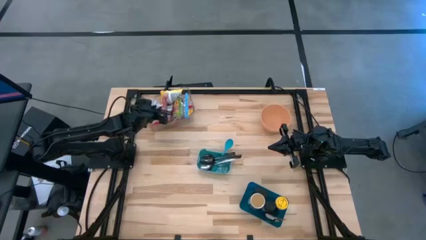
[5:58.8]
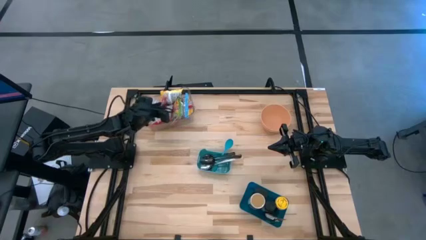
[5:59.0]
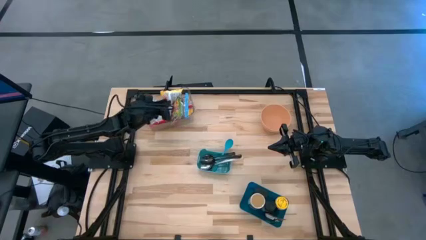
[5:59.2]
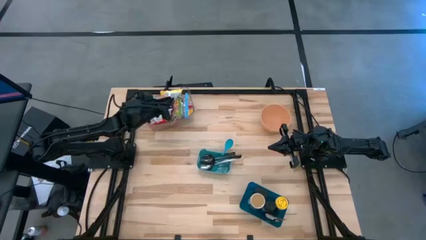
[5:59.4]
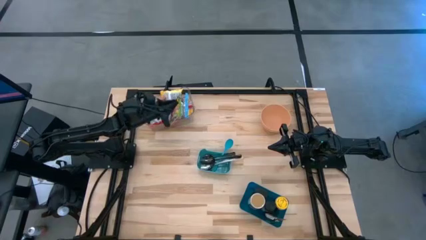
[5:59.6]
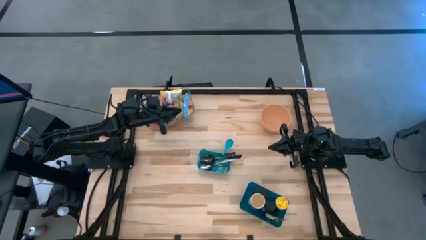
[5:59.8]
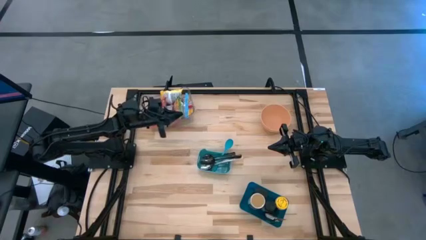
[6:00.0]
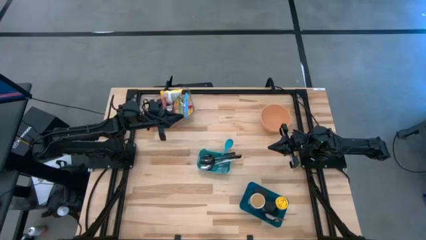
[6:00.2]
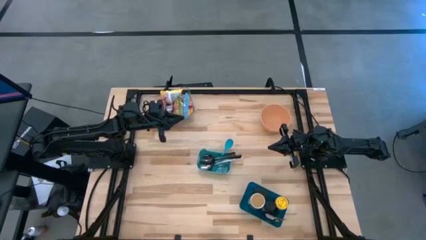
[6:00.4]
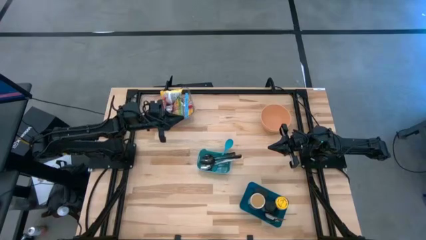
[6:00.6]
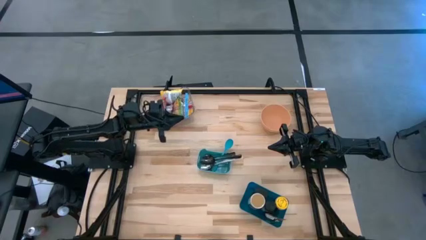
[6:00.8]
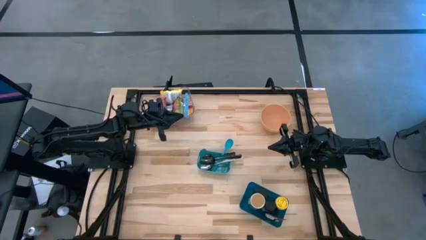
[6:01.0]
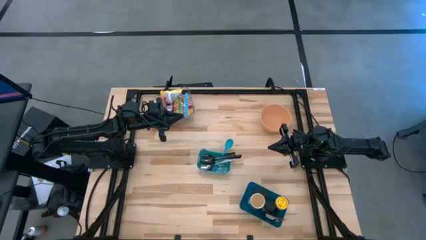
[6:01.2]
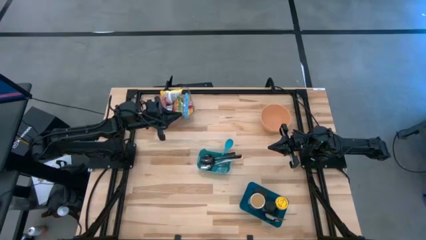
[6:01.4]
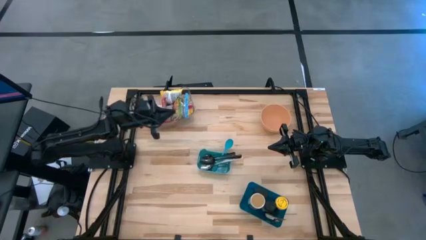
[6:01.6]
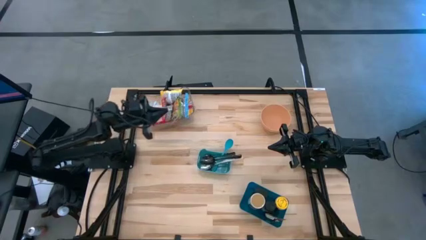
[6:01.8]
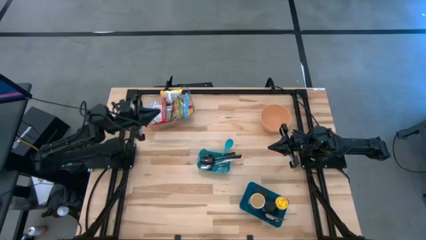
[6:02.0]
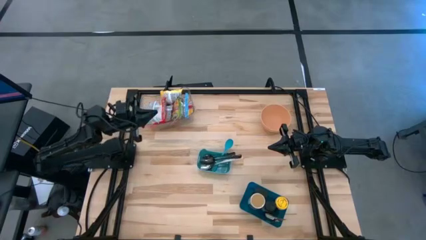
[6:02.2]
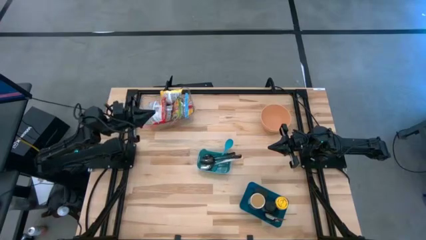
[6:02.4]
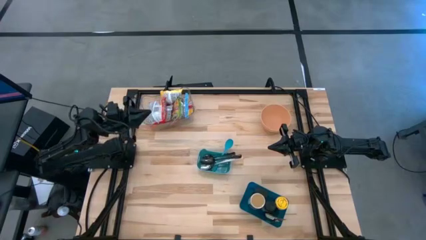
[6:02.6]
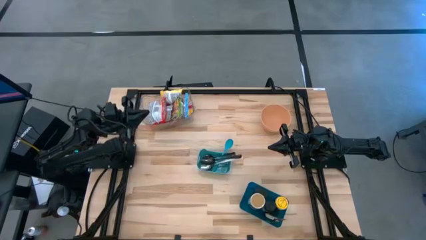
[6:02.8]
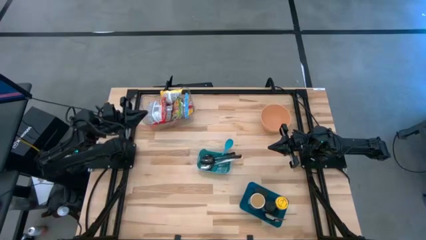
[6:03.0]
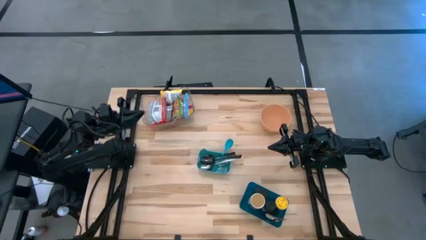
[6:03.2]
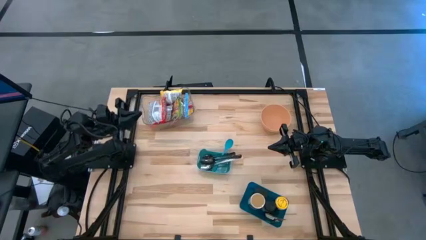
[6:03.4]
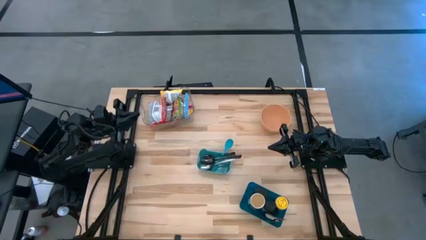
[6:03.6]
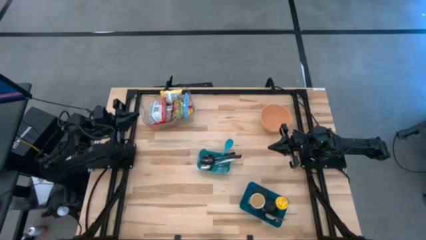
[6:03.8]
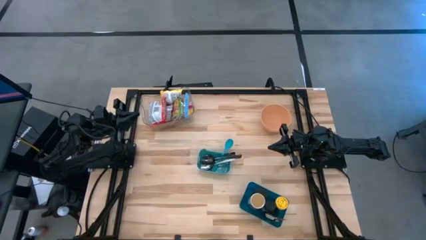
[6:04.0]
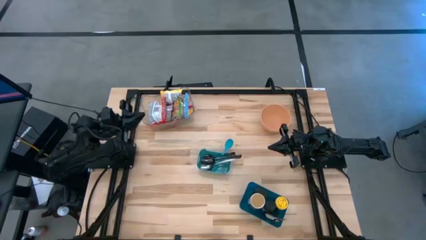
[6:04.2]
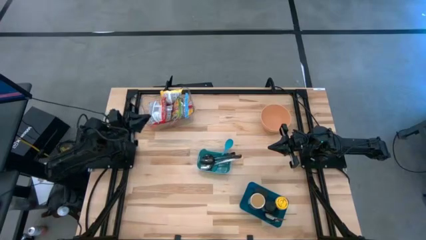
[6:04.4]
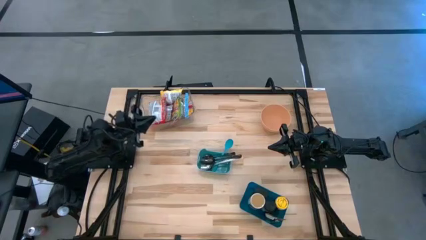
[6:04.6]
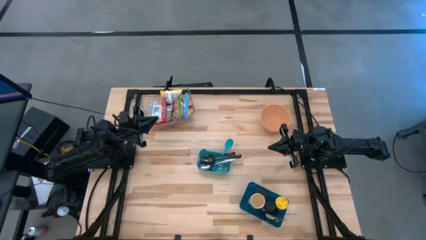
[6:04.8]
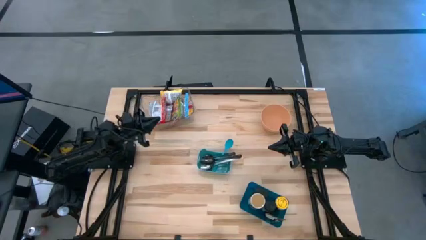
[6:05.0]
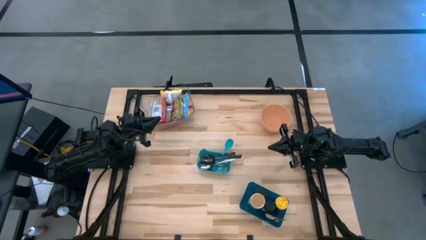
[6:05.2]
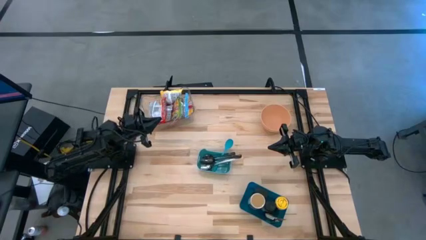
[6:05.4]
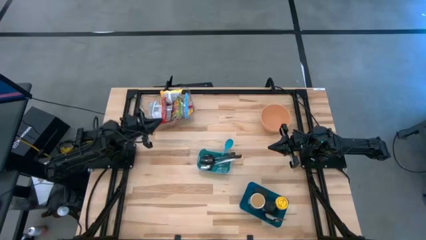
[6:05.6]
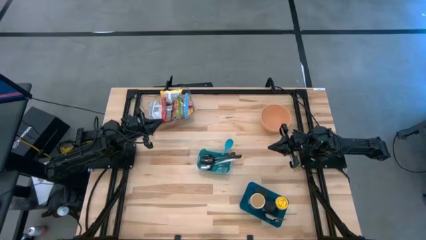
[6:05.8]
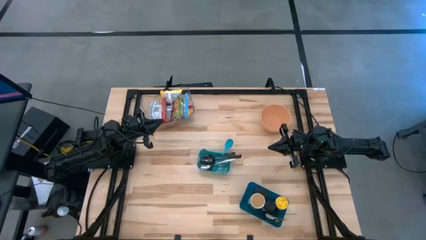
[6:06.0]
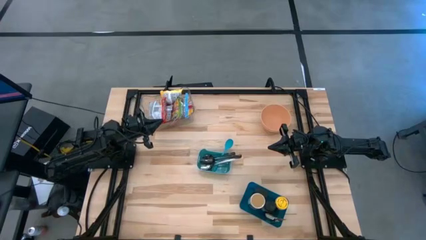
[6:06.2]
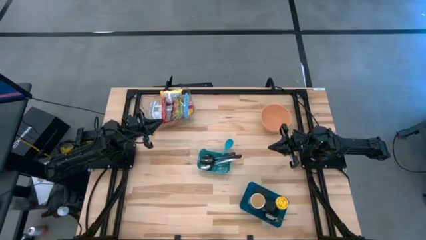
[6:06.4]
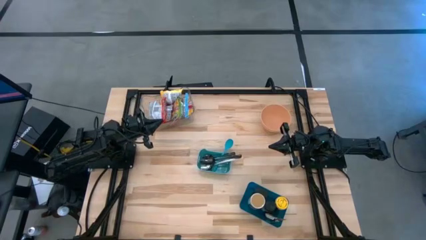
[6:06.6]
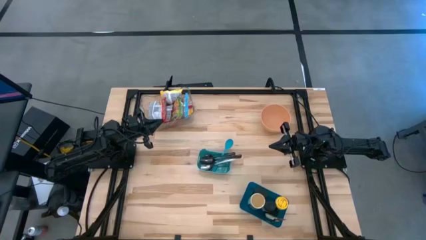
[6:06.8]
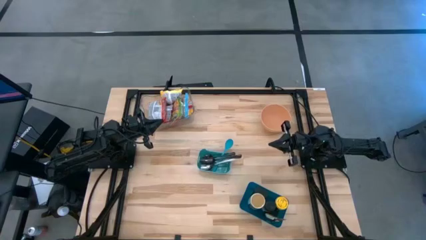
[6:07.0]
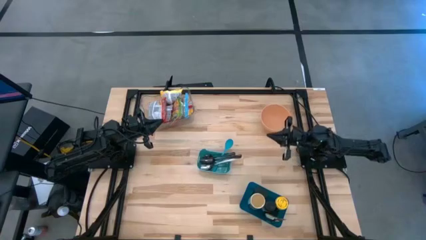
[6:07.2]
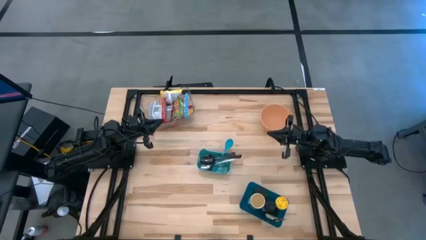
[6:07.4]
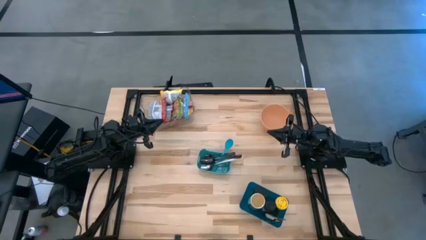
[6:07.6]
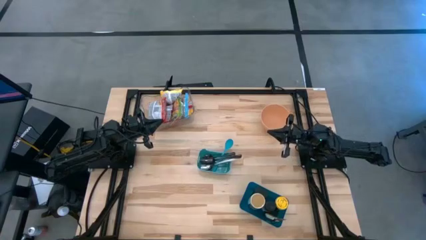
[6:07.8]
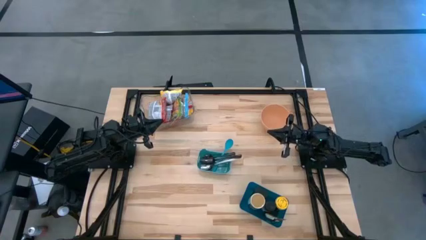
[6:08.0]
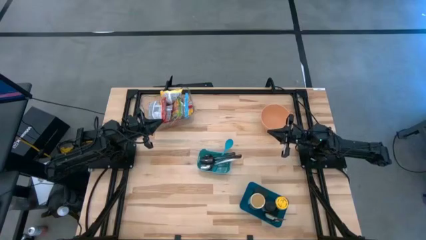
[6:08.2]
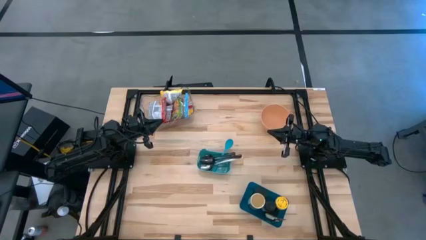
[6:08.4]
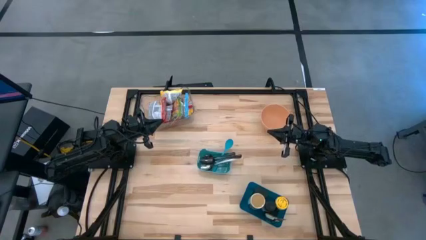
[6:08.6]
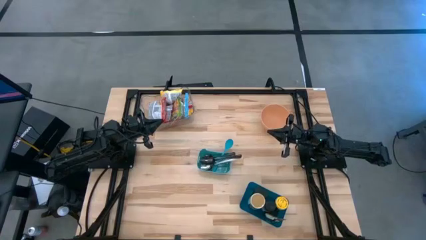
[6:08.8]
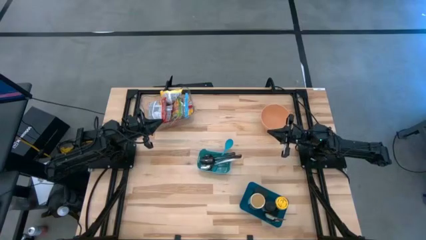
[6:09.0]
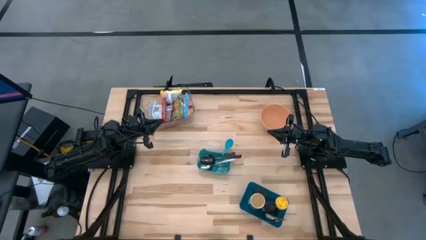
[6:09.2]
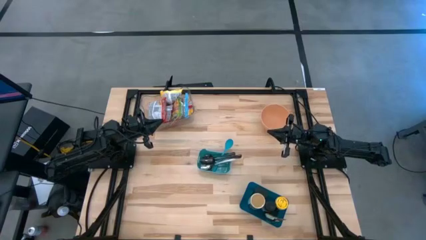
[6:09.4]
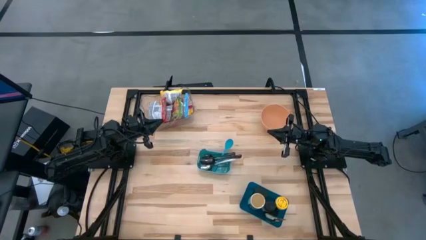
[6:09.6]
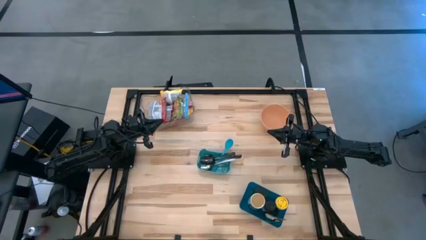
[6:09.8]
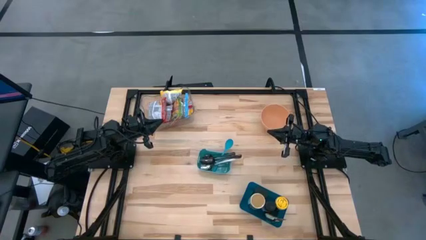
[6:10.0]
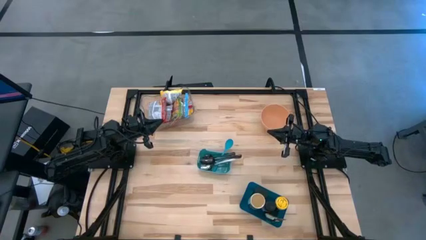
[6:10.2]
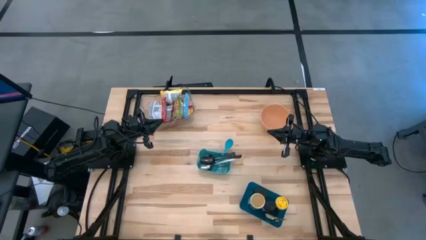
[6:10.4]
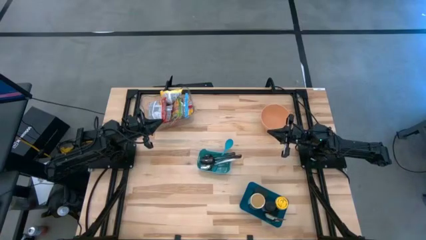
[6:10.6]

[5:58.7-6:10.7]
Task: Pick & Place Food Item
Return to Home Position
